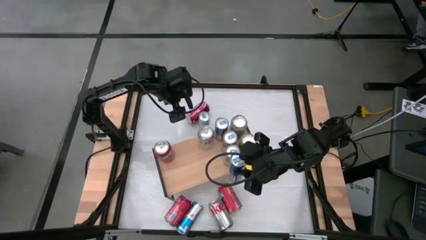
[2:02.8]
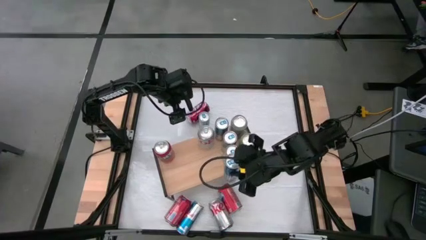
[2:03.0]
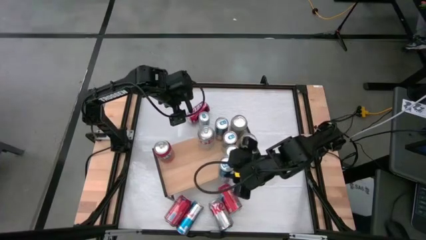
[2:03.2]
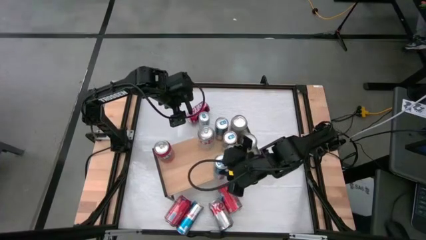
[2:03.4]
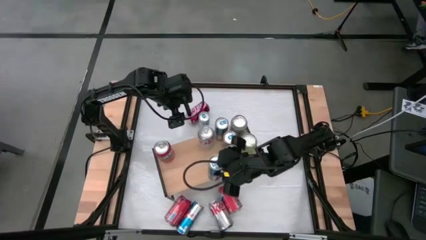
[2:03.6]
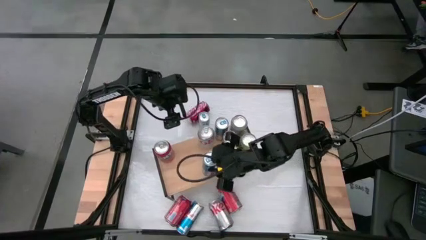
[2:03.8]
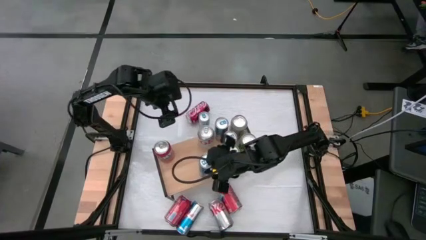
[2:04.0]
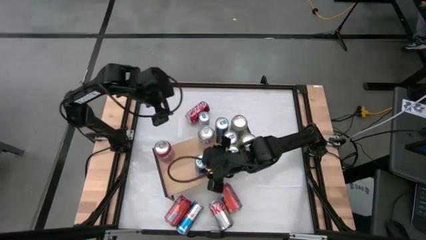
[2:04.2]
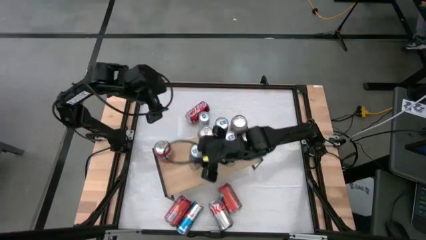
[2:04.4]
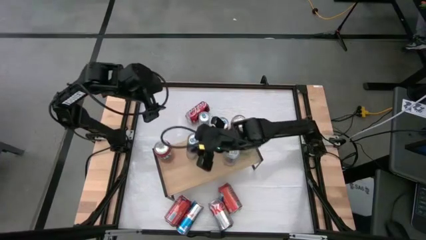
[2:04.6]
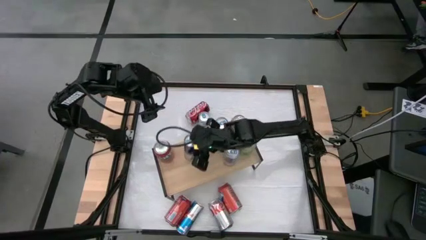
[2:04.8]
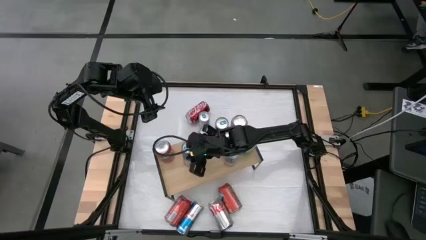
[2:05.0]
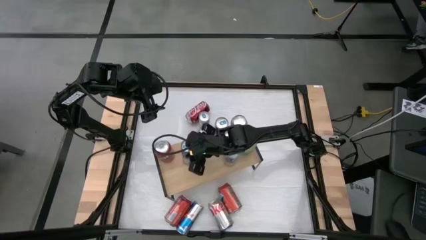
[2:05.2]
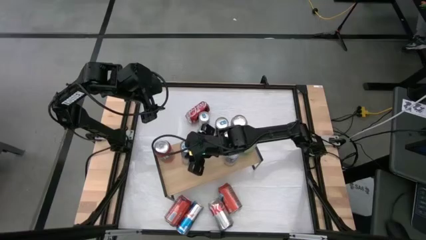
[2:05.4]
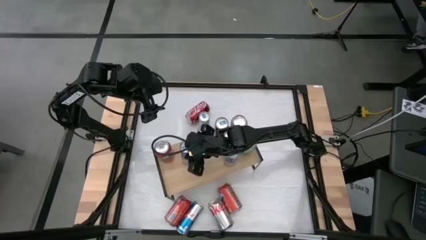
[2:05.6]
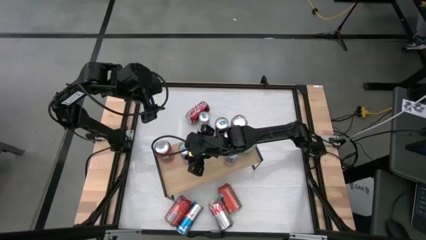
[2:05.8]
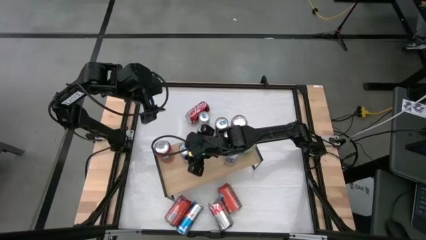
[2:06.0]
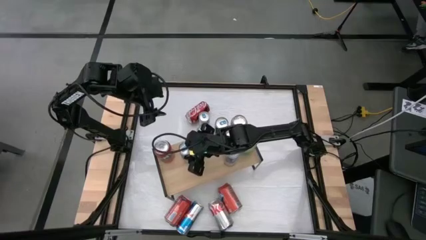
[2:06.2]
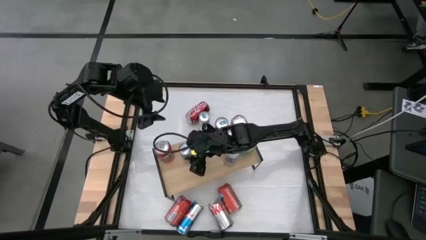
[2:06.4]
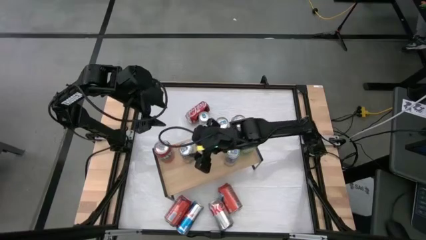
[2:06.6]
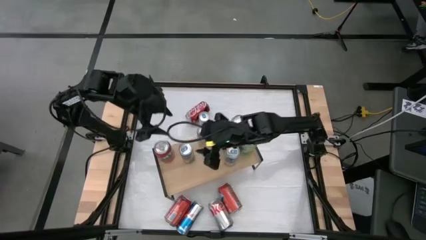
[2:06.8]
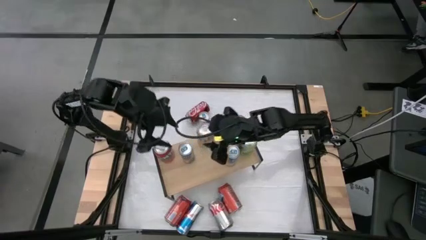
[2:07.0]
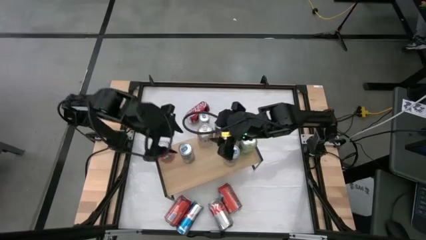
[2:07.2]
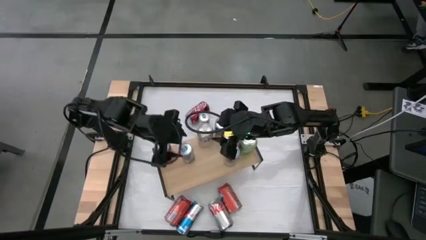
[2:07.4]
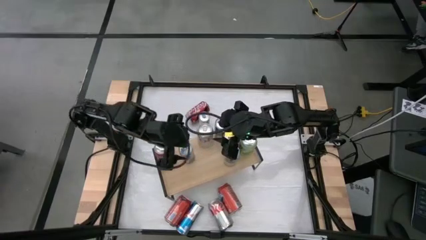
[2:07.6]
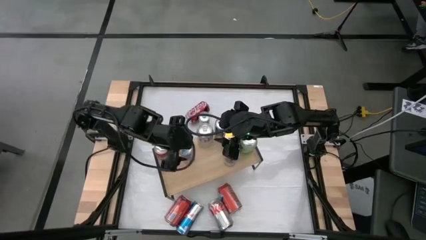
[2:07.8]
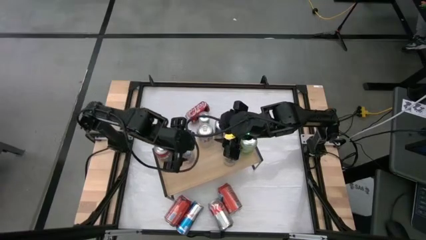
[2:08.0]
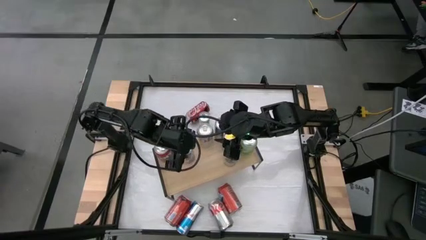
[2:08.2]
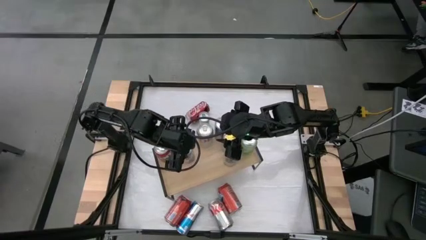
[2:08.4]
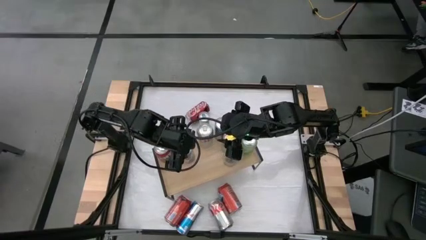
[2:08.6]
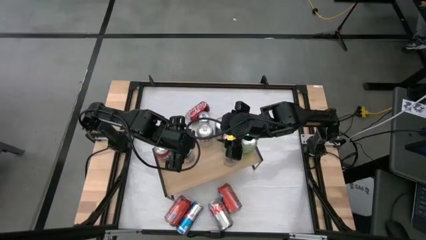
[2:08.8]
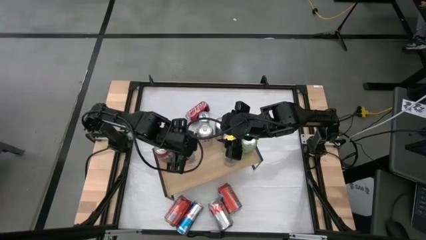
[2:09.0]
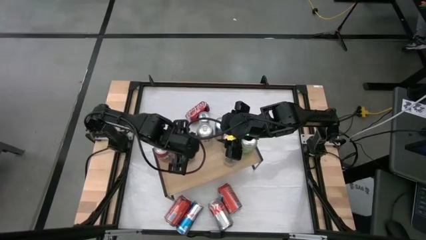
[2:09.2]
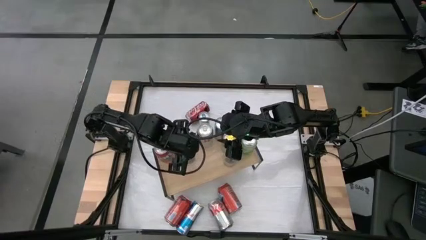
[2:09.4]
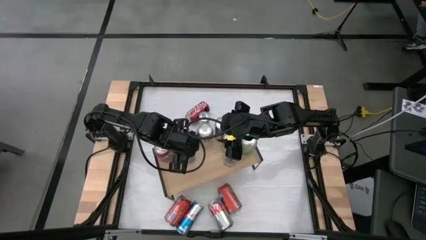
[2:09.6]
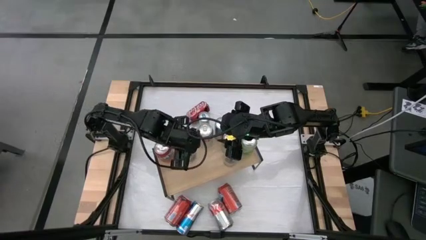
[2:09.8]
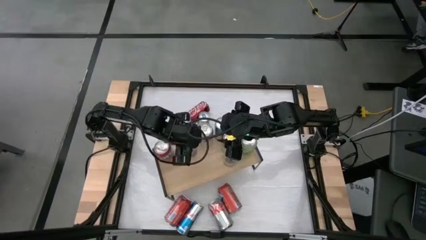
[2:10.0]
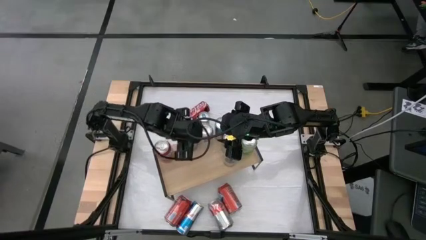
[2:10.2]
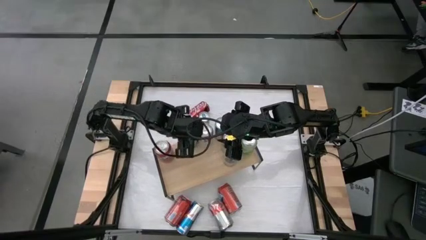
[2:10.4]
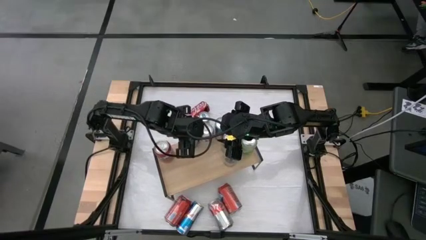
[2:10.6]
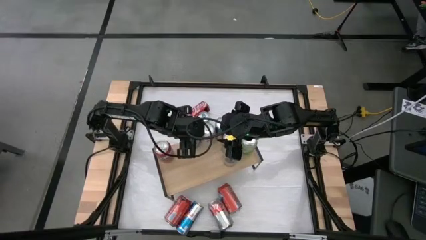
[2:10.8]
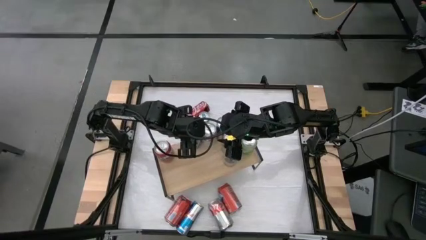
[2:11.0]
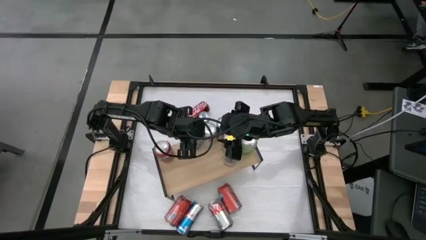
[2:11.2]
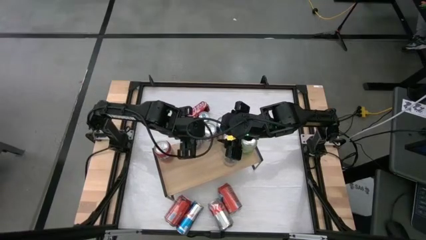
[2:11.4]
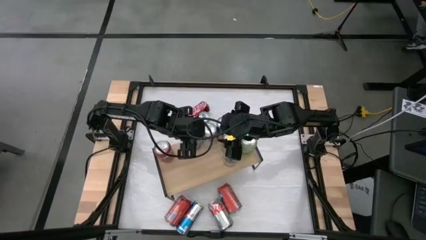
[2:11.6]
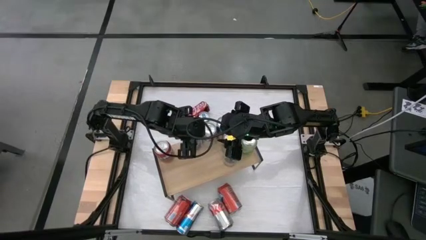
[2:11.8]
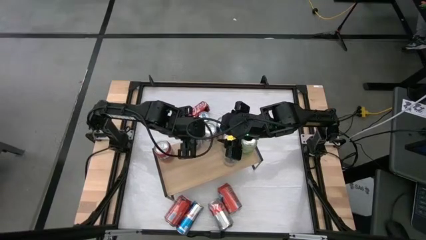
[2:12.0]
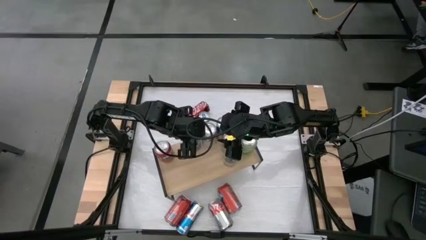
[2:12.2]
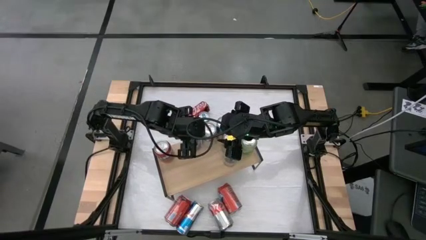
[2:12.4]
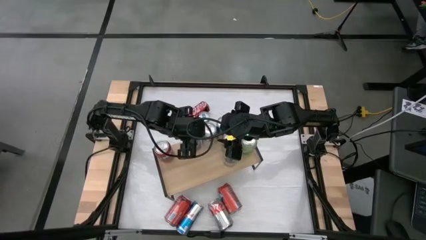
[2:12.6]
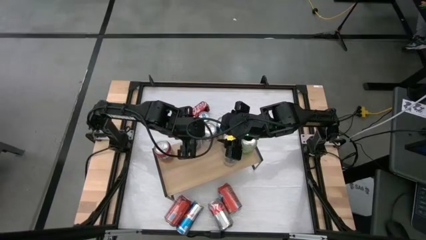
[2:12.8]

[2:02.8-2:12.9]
Task: Place canned beverage on shelf
Put the blue soda can on the shelf

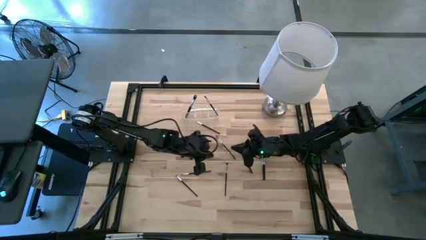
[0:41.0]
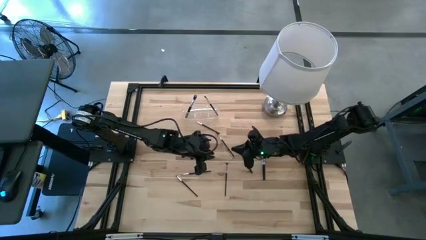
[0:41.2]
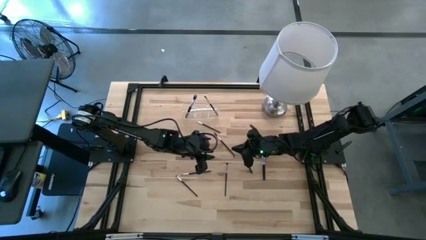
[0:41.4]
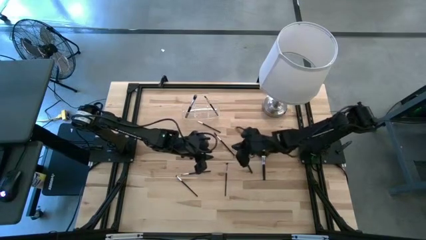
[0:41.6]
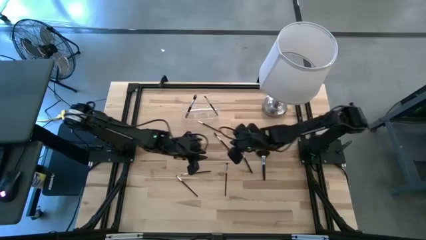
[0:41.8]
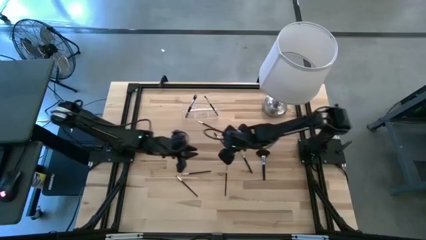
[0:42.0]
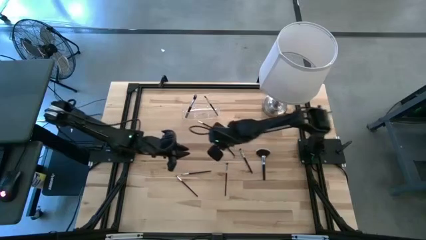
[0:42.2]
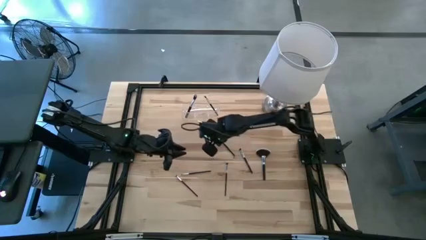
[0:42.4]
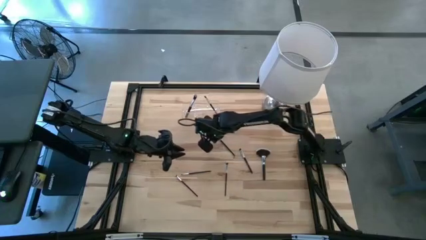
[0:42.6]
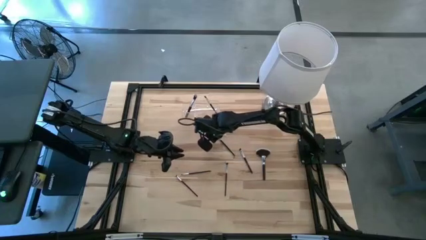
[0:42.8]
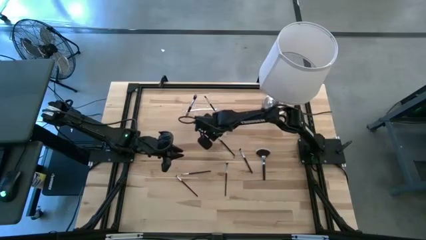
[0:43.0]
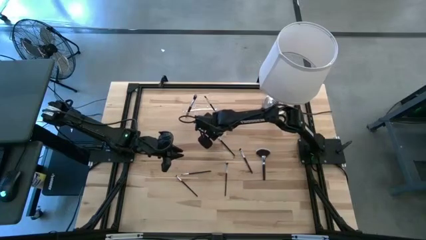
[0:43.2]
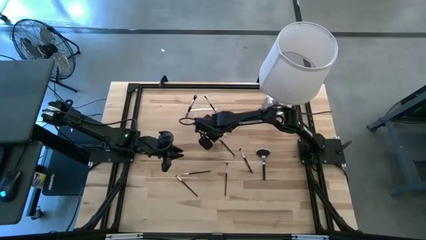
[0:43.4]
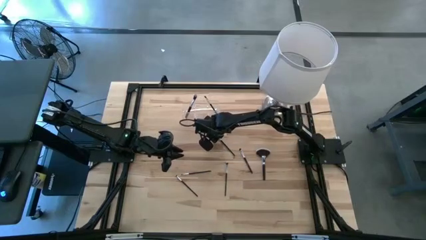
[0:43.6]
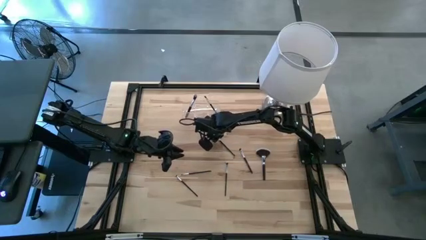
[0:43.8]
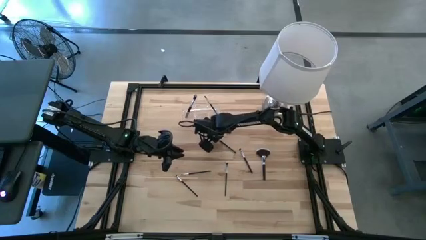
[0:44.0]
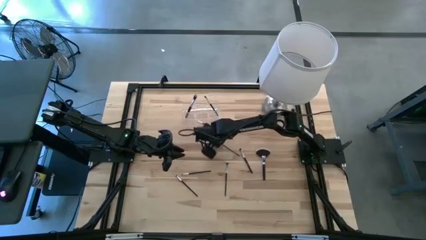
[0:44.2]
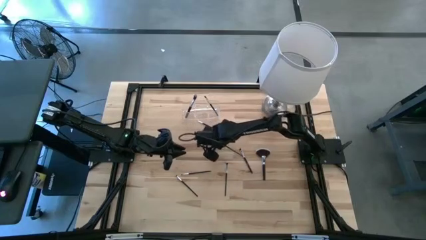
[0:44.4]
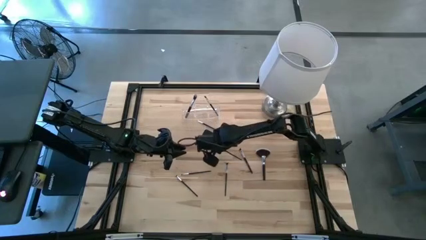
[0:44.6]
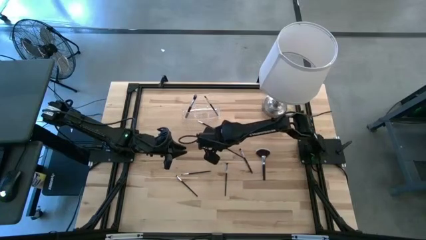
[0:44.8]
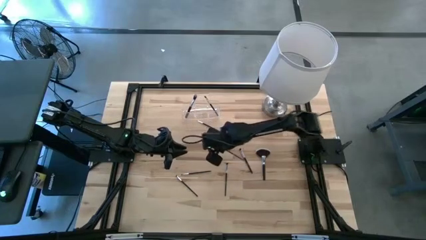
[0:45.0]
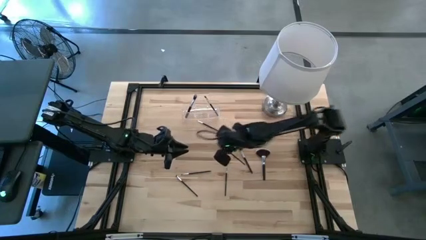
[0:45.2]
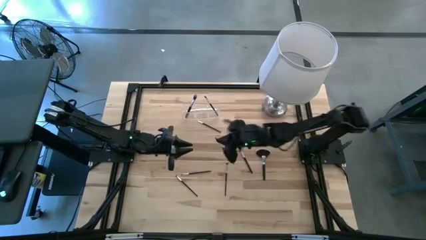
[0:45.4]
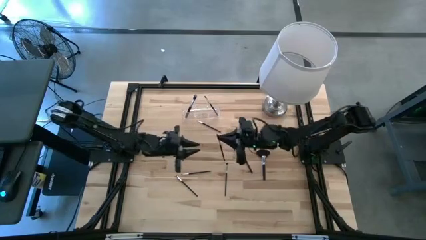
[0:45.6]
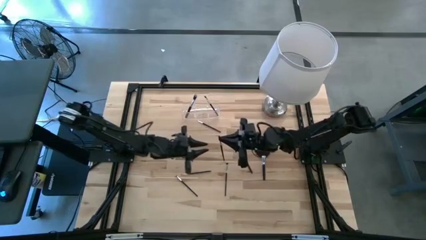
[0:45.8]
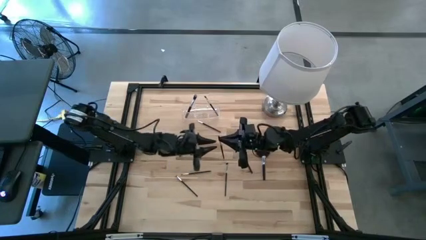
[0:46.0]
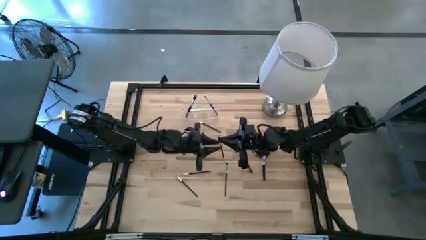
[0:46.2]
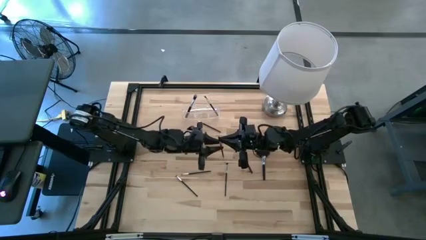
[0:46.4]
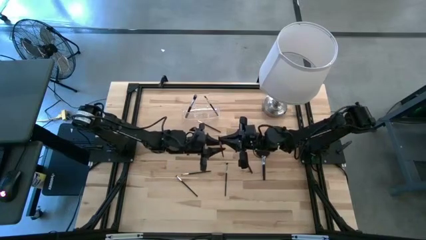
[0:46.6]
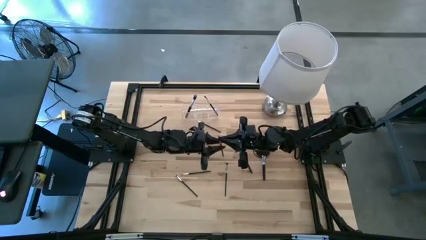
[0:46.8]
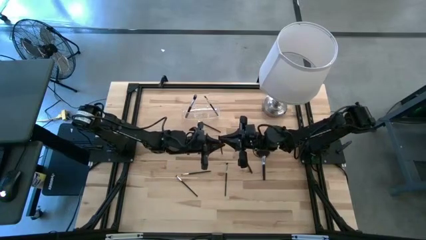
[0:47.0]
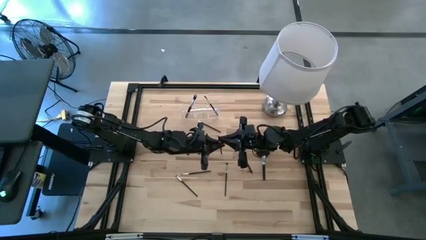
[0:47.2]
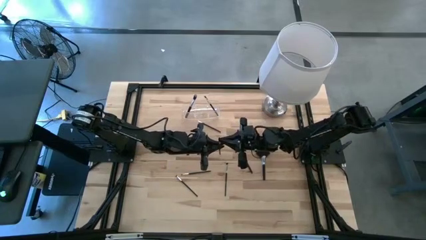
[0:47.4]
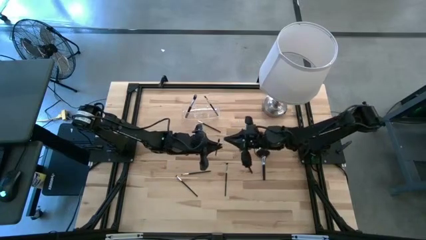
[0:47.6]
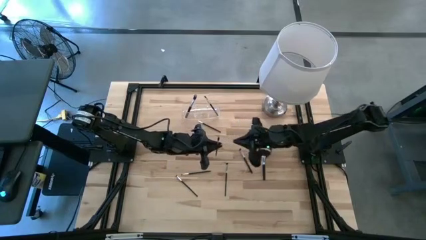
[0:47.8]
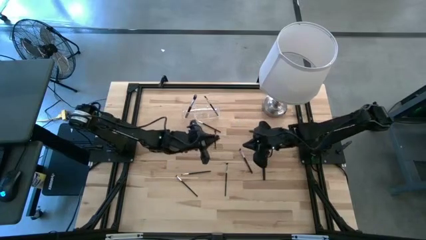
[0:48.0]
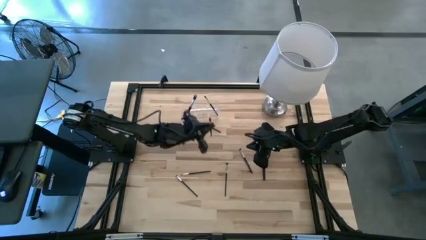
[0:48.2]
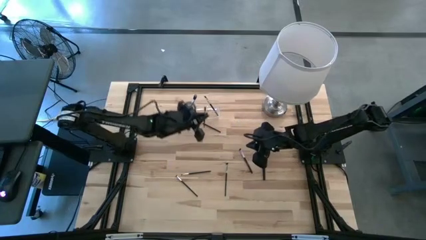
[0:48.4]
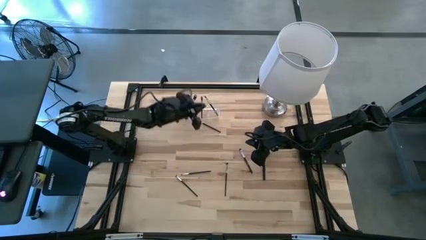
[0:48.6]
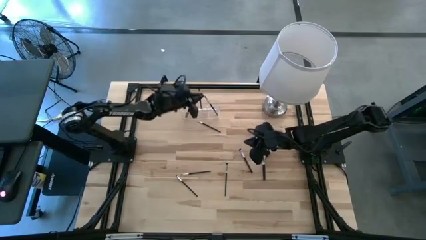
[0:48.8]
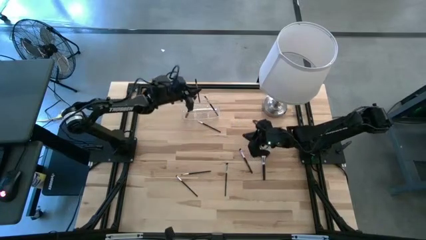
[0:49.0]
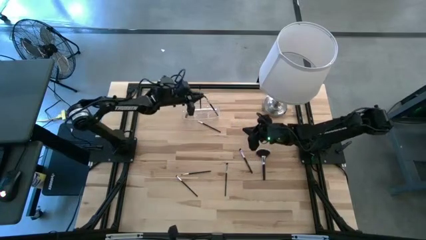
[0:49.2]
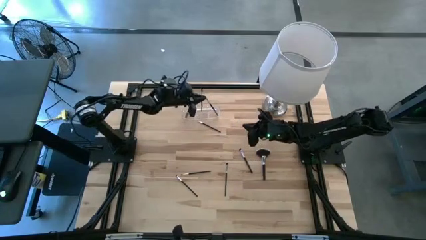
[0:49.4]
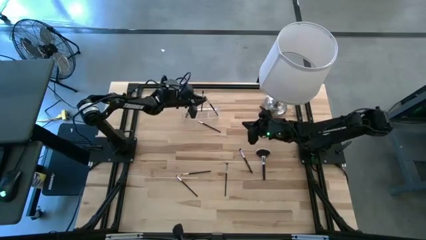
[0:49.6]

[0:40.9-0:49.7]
Task: Put items in baskets/containers
Put the lash brush into the transparent organizer
